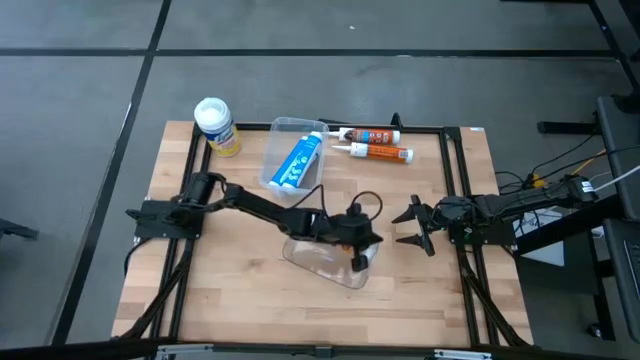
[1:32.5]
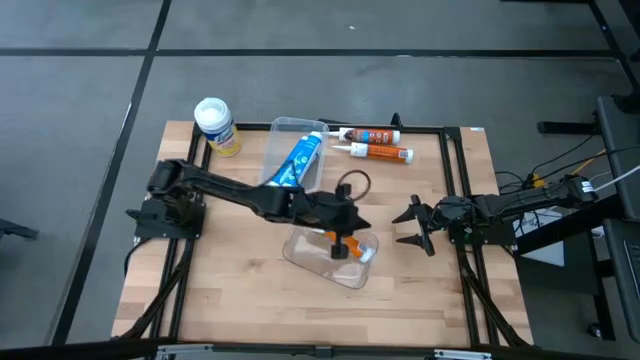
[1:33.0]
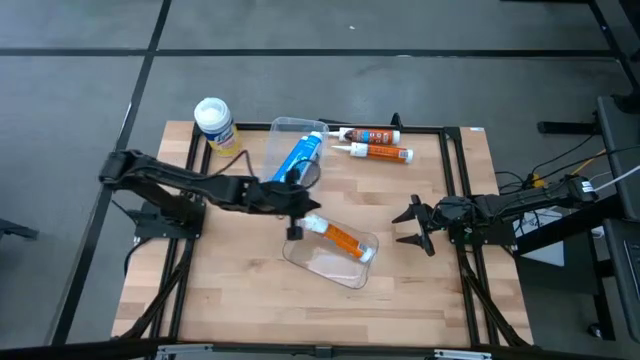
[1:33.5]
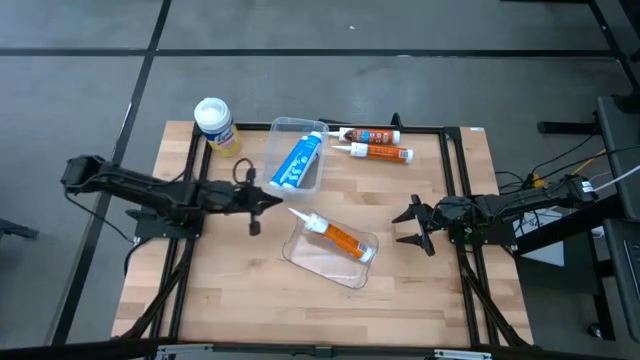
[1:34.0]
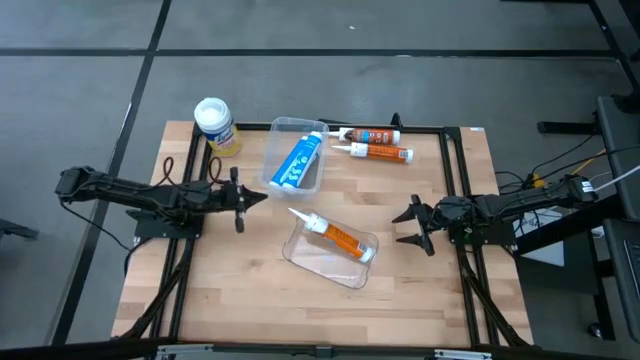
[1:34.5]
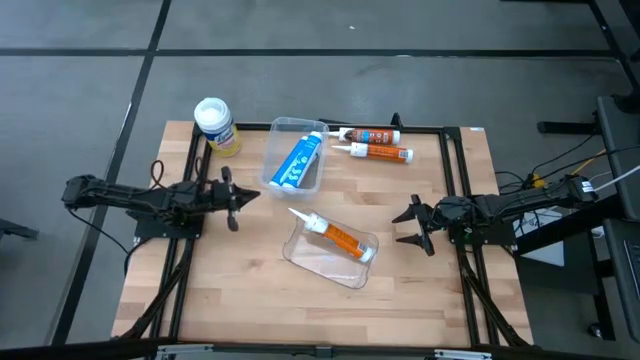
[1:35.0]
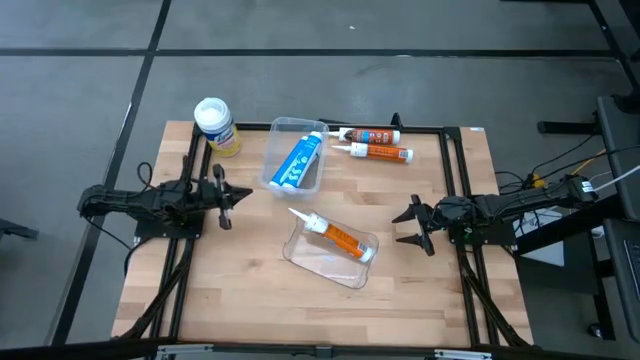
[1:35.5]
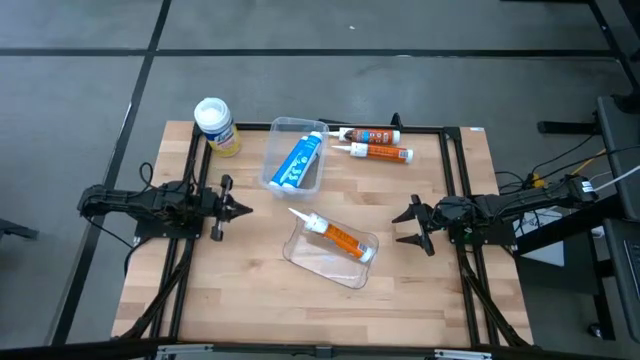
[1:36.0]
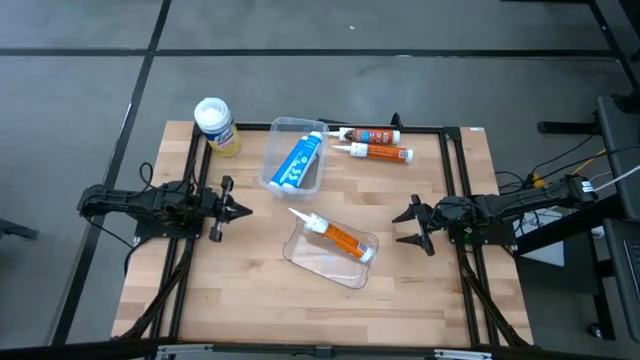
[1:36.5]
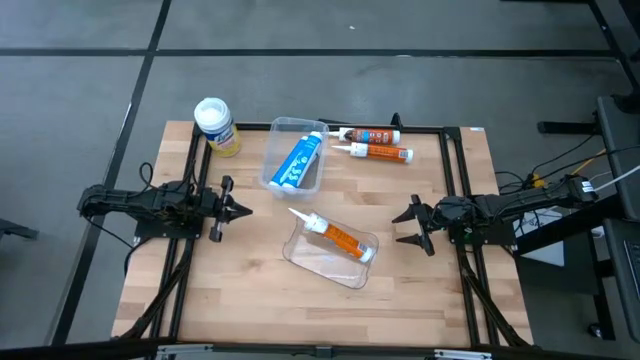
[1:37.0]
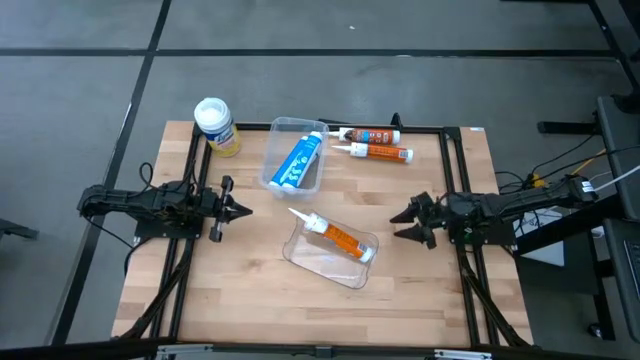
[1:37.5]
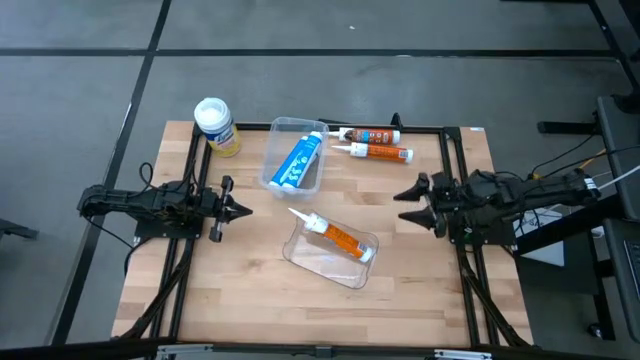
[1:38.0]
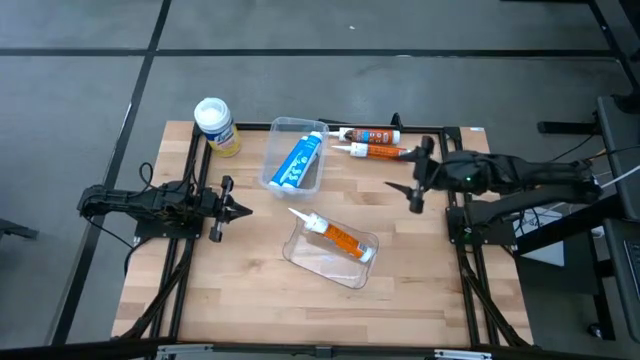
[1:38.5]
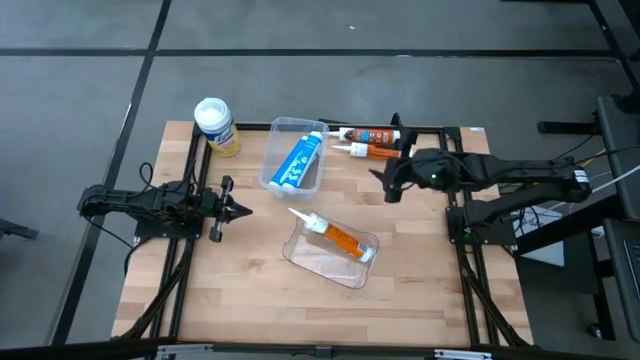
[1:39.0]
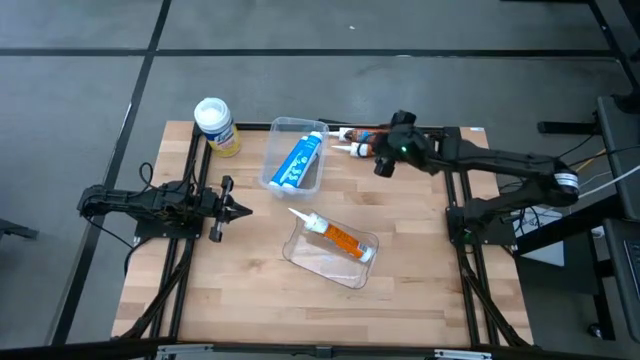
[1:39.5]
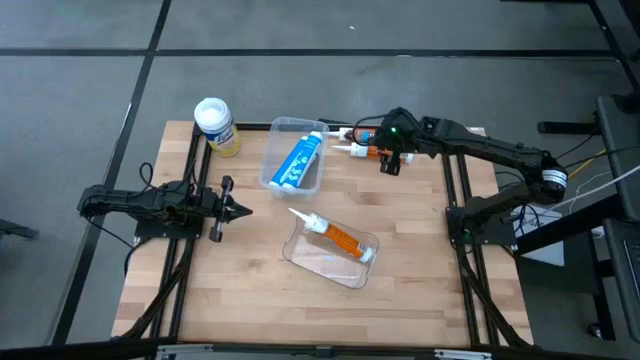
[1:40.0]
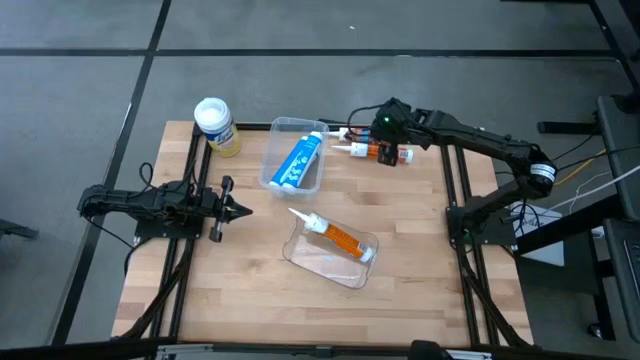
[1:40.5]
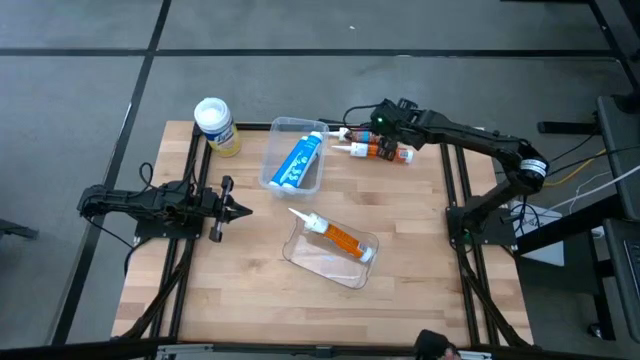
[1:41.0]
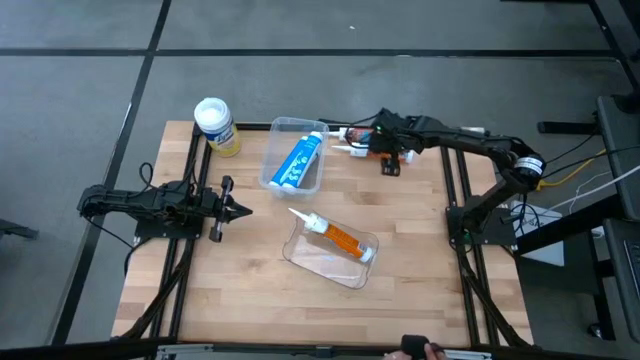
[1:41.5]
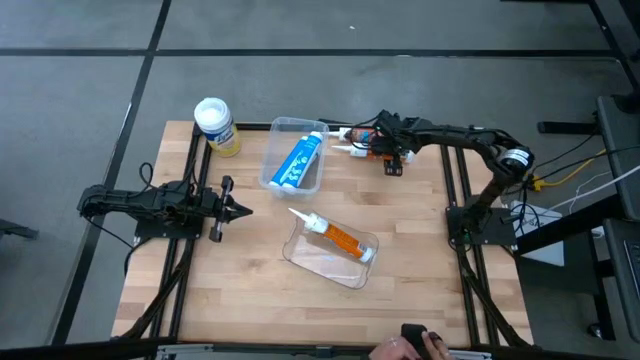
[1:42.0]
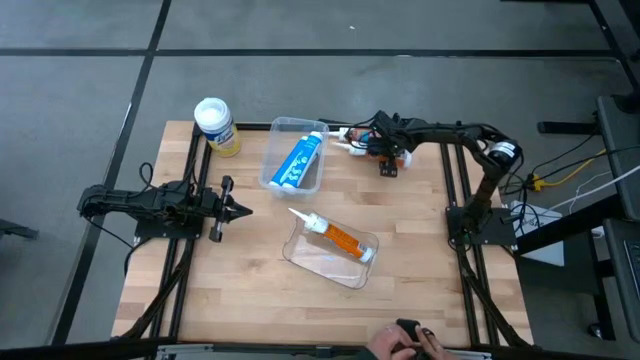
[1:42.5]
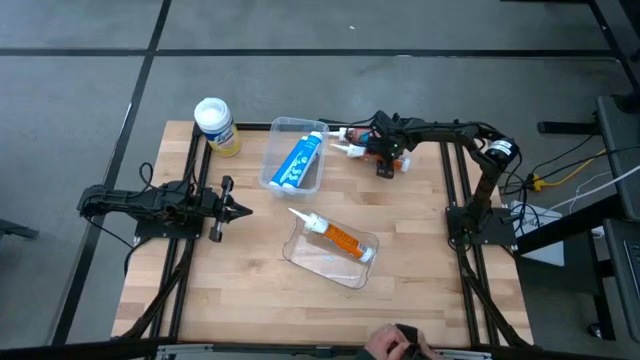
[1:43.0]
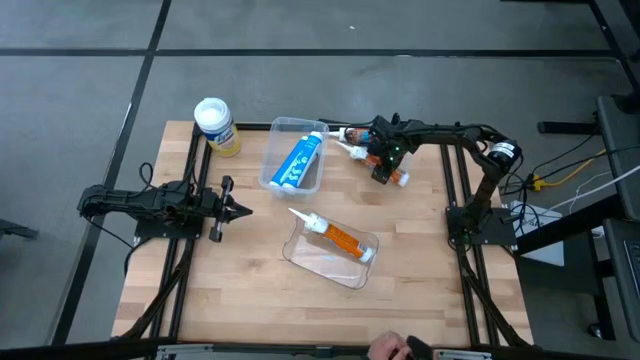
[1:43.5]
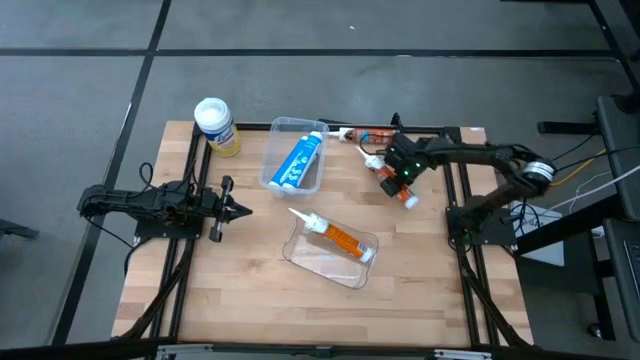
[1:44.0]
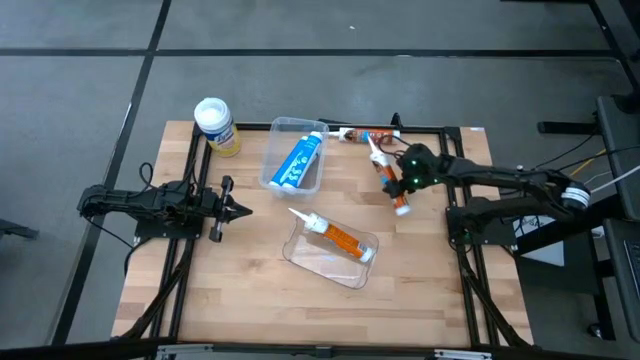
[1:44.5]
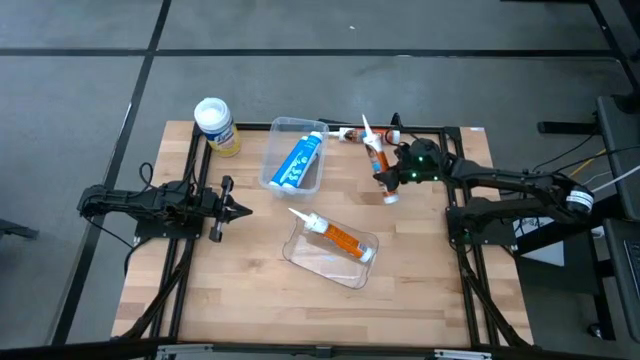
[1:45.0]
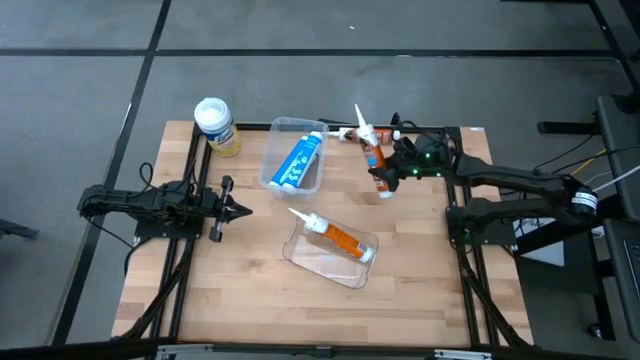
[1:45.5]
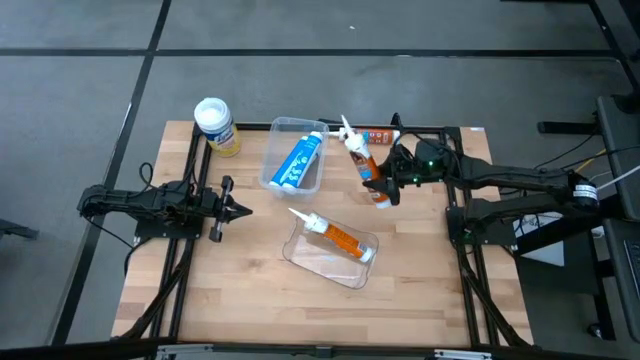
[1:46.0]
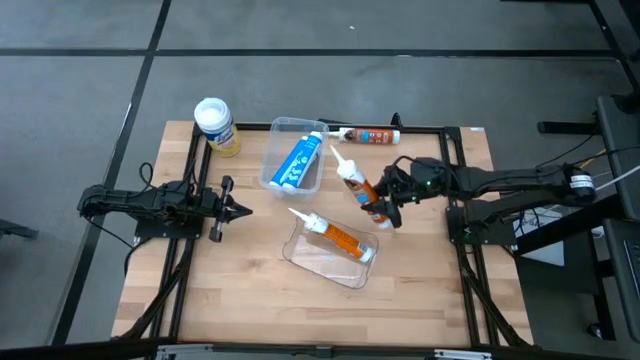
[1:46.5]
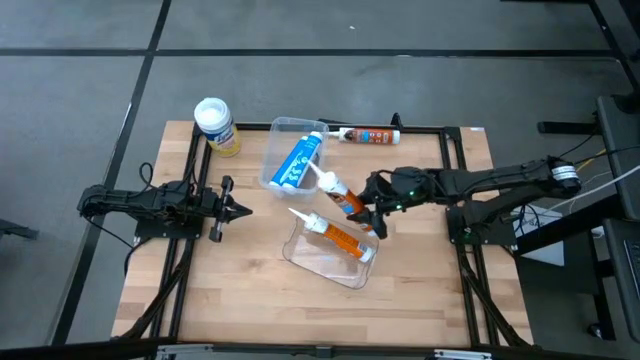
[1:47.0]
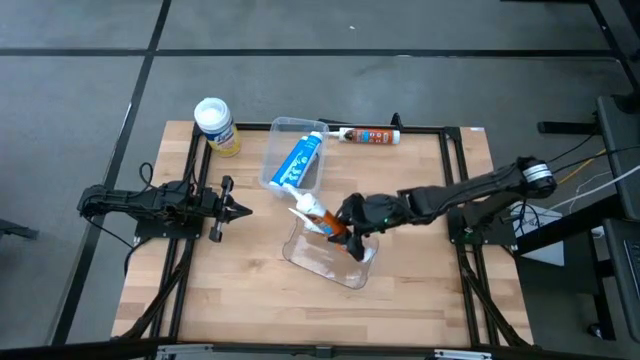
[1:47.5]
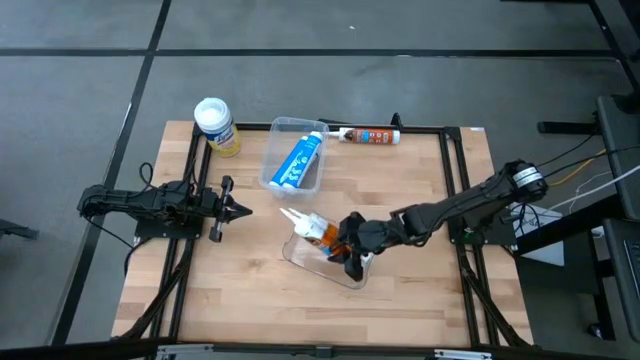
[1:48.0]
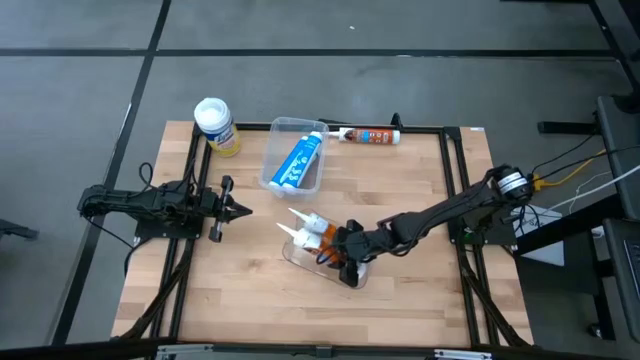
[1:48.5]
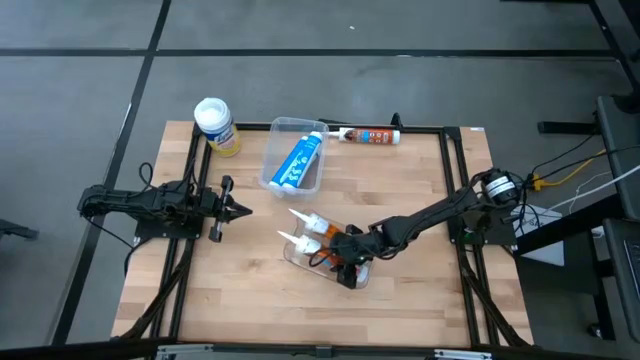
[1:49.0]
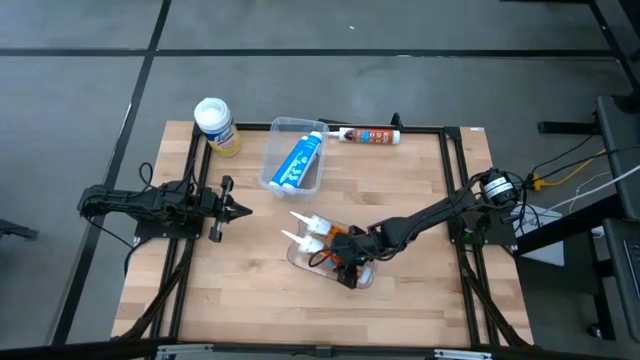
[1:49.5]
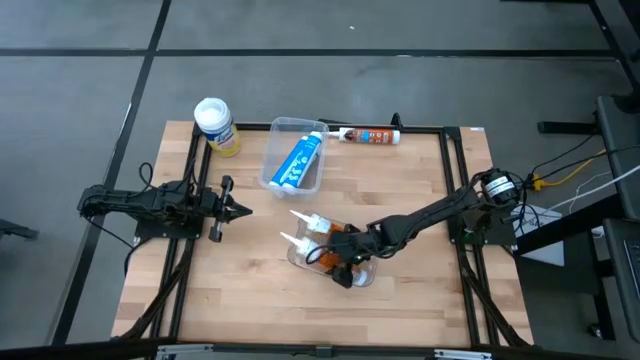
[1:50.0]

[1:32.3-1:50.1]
Task: Pick & place silicon tubes, Sealant and Lysol wipes
Put the bottom orange sealant into the bottom transparent bin

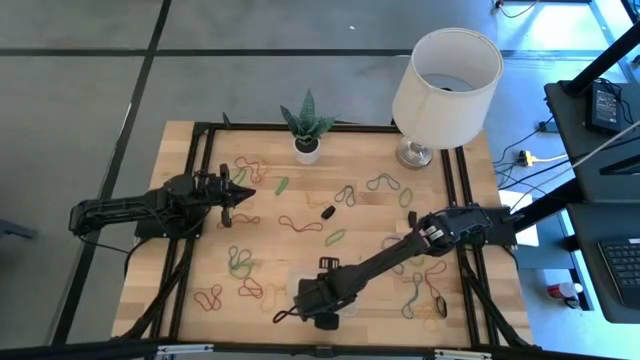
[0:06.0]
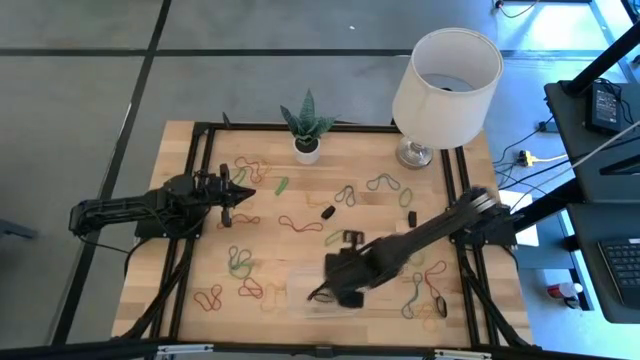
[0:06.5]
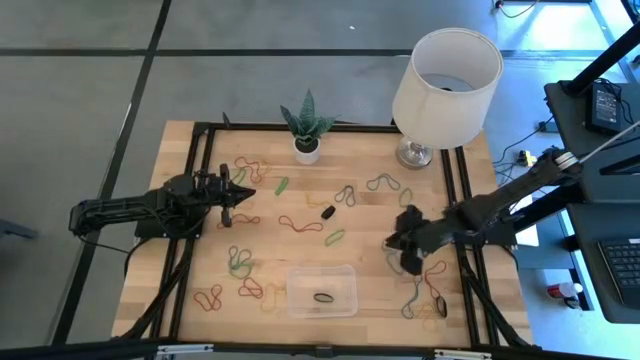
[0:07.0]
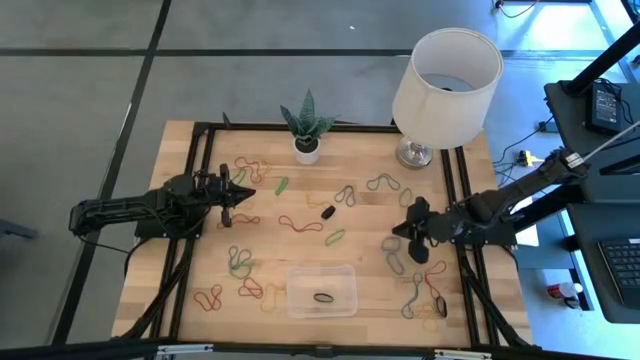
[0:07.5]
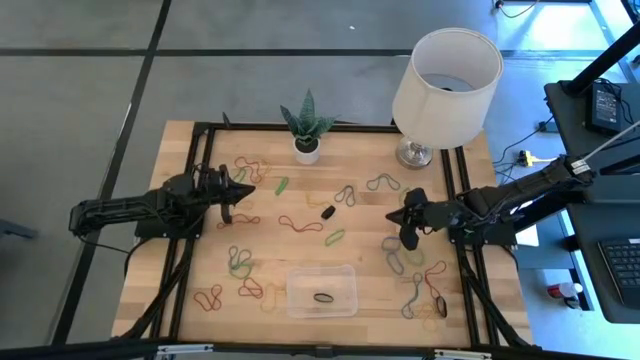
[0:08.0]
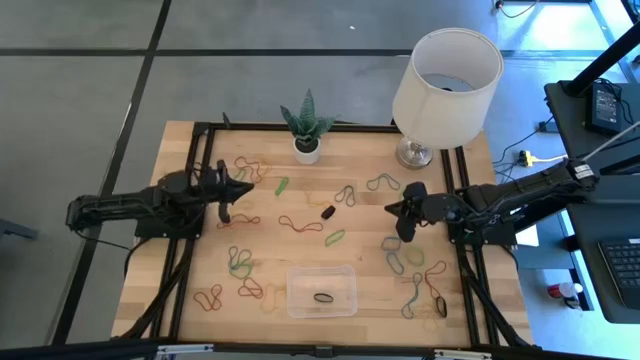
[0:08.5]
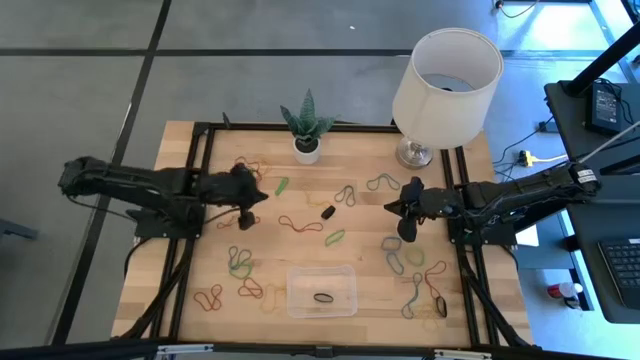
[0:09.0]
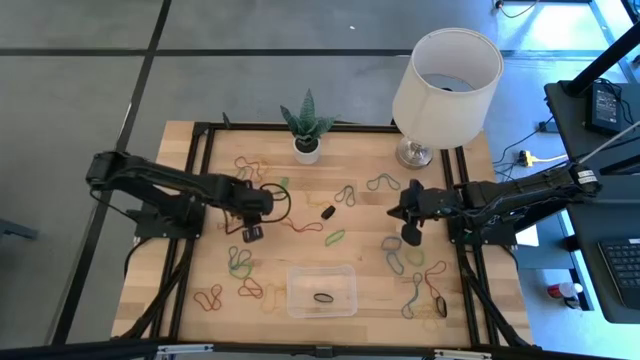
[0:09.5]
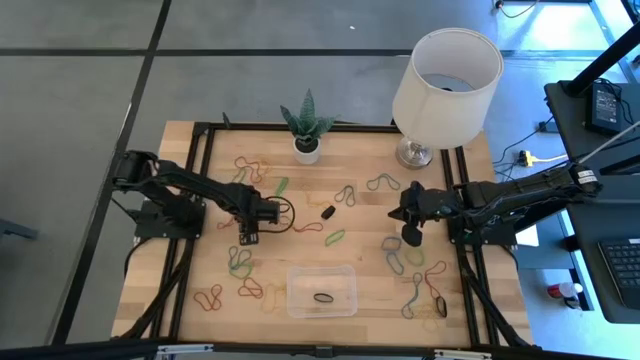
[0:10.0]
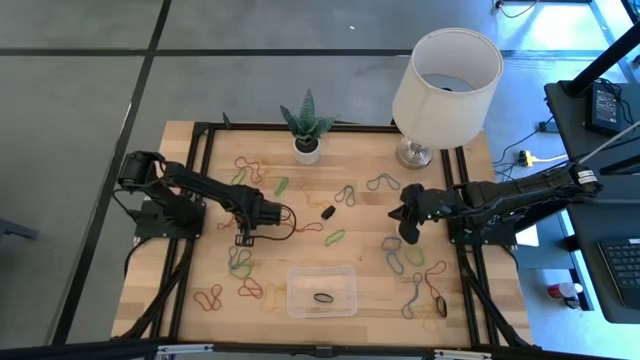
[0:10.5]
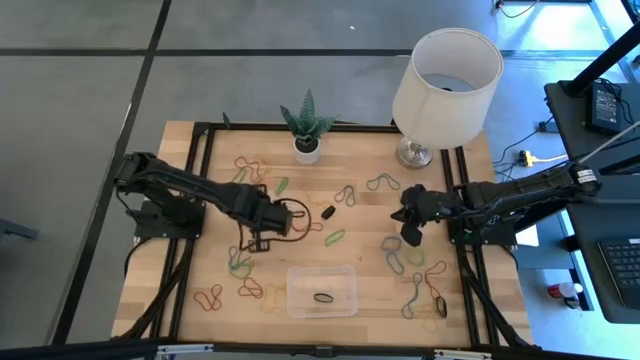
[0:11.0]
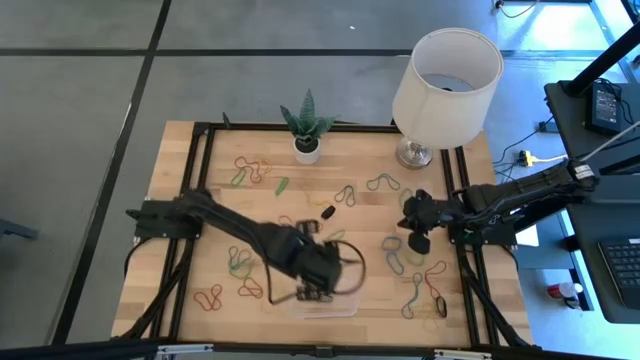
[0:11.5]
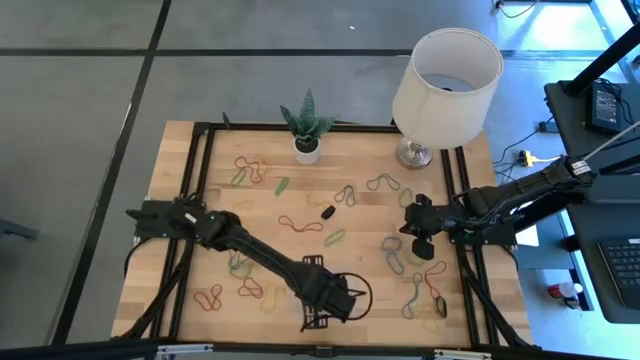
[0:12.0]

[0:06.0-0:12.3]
Task: Pick and place rubber bands into bin
Put the red rubber band into the transparent bin
